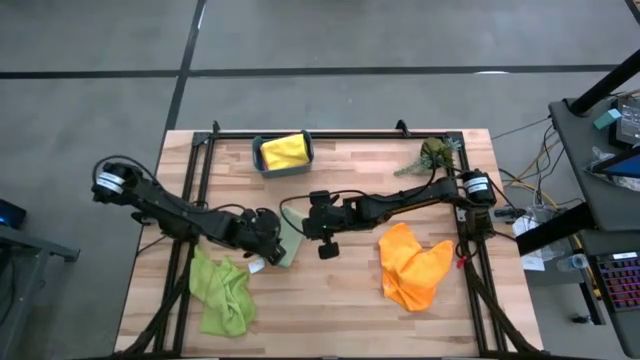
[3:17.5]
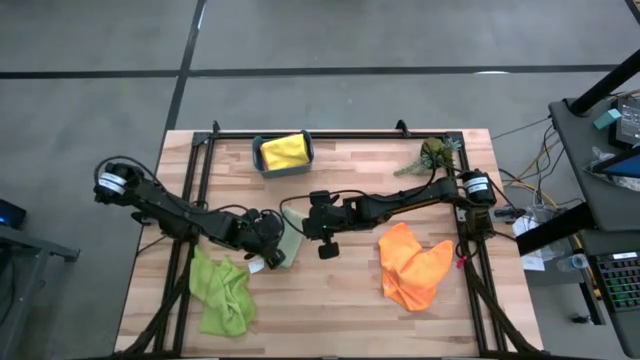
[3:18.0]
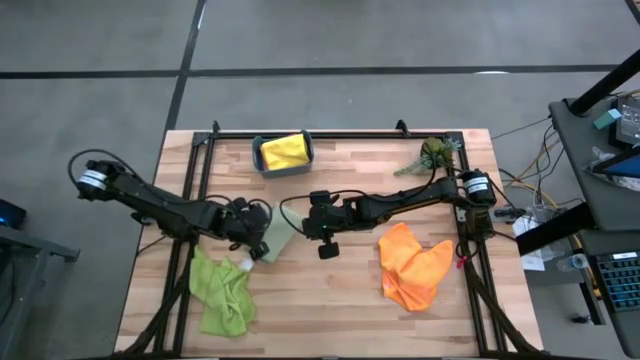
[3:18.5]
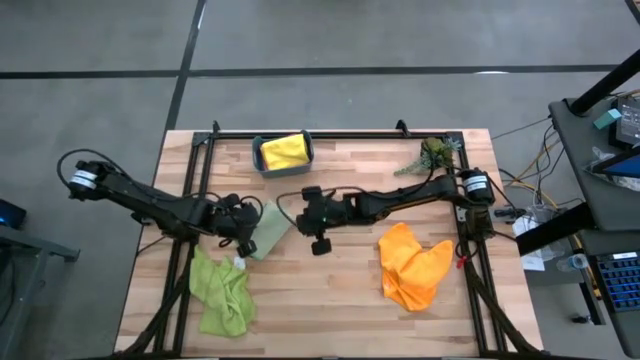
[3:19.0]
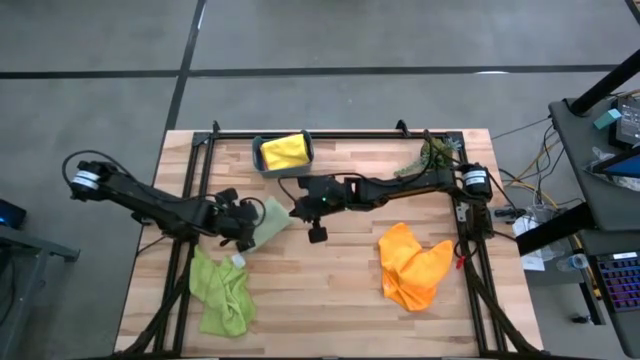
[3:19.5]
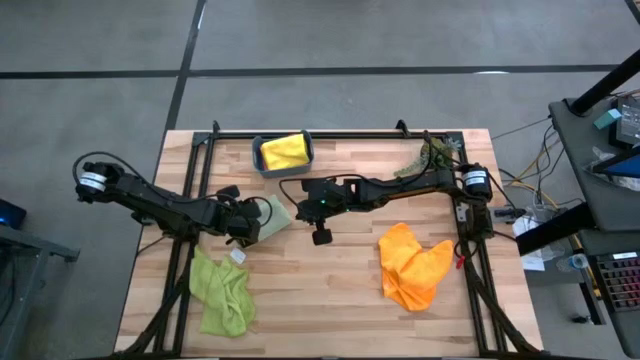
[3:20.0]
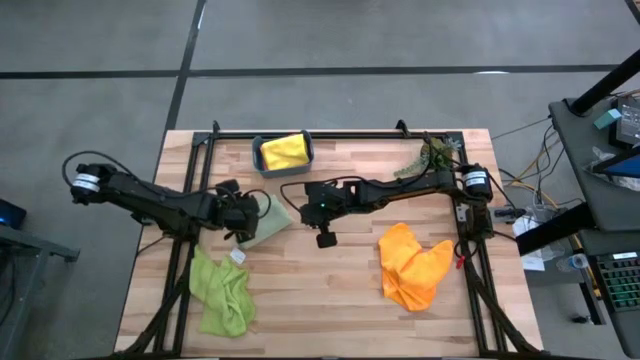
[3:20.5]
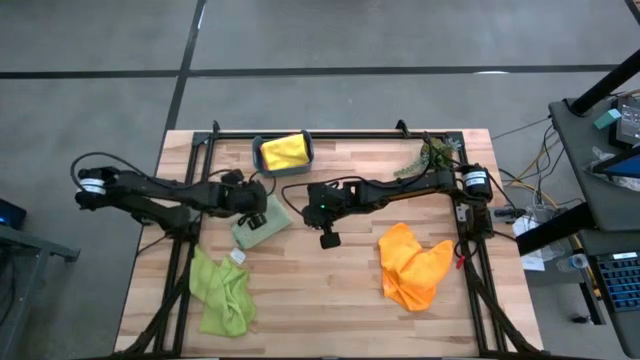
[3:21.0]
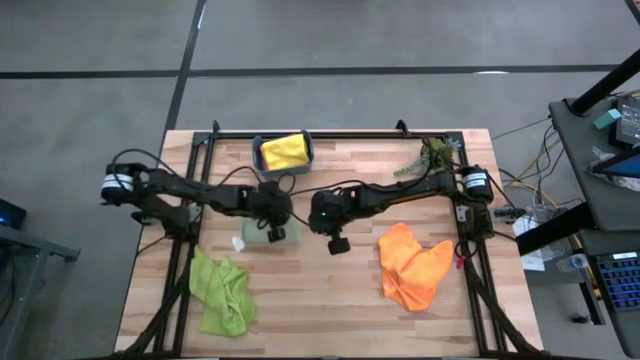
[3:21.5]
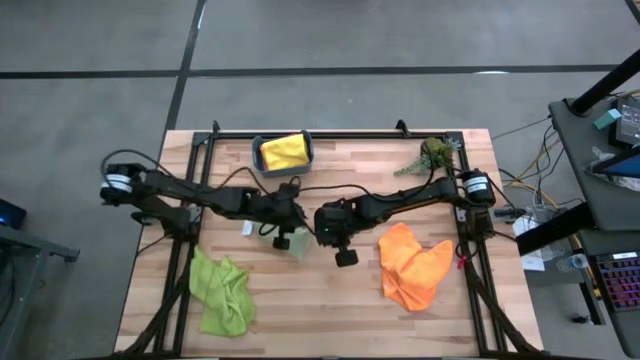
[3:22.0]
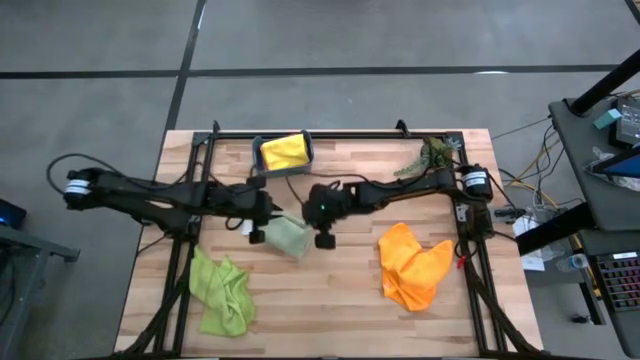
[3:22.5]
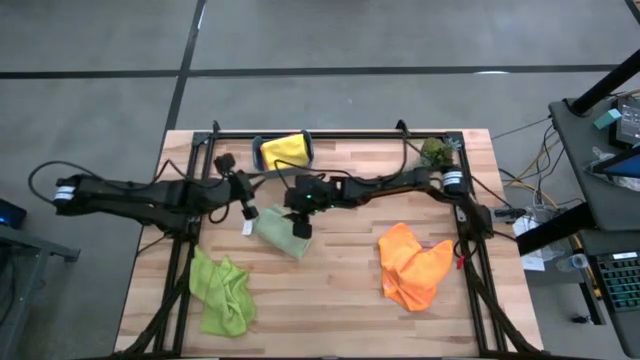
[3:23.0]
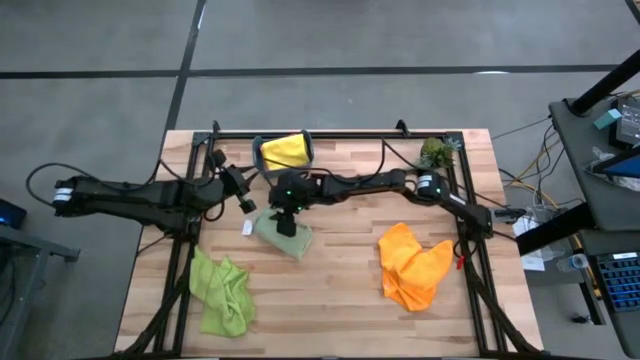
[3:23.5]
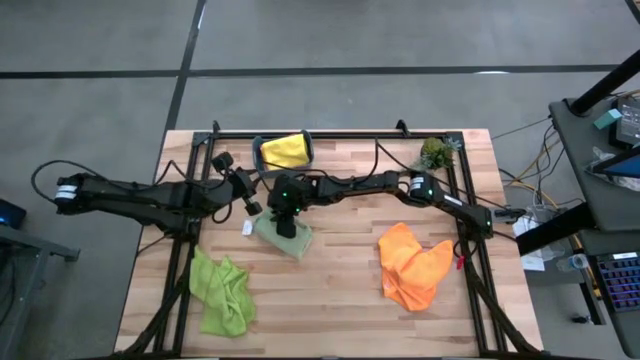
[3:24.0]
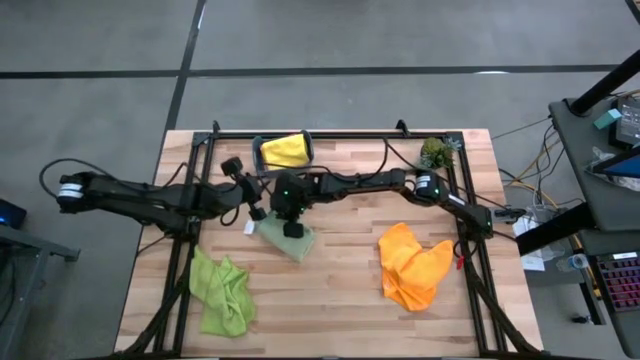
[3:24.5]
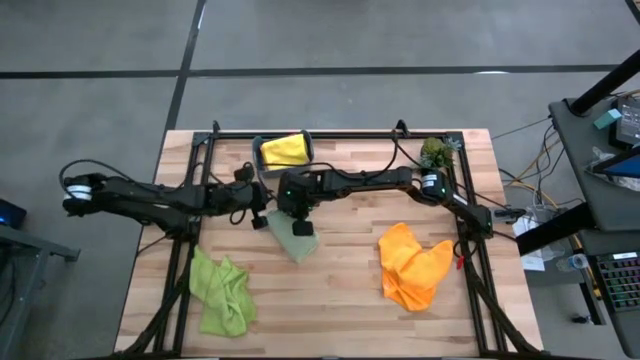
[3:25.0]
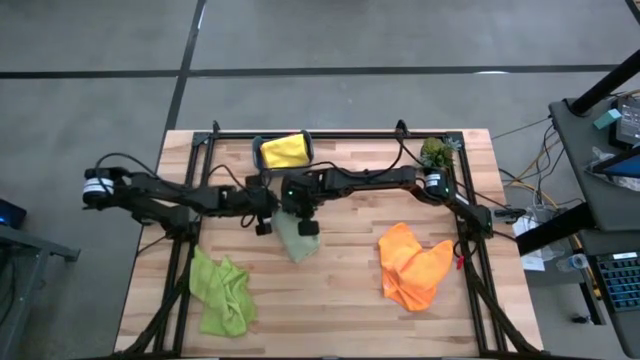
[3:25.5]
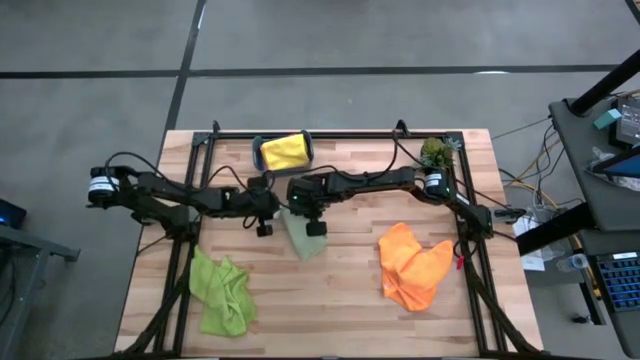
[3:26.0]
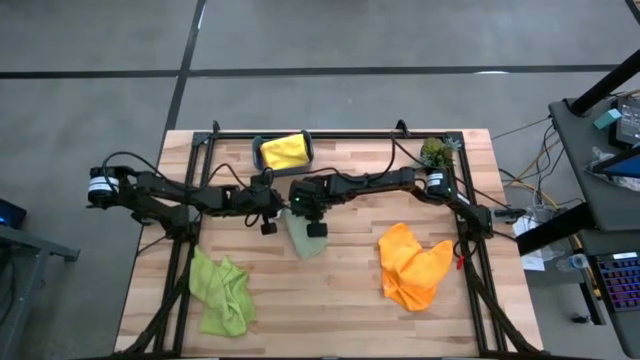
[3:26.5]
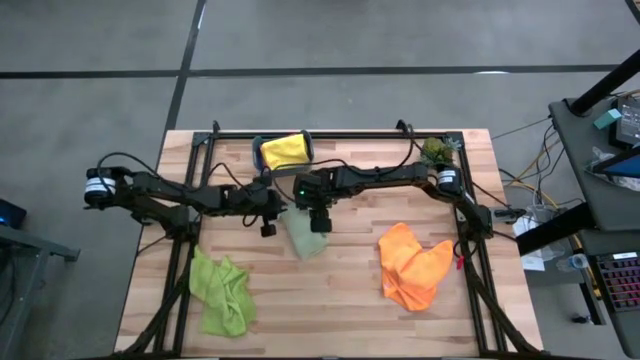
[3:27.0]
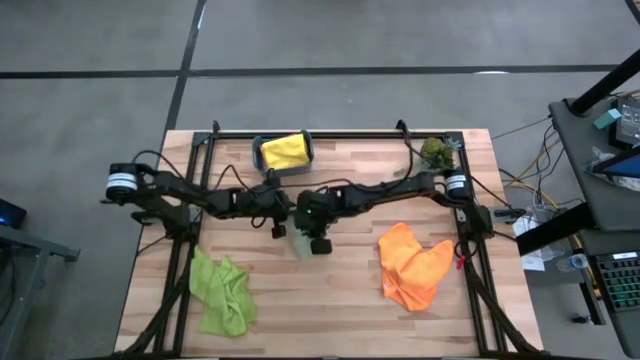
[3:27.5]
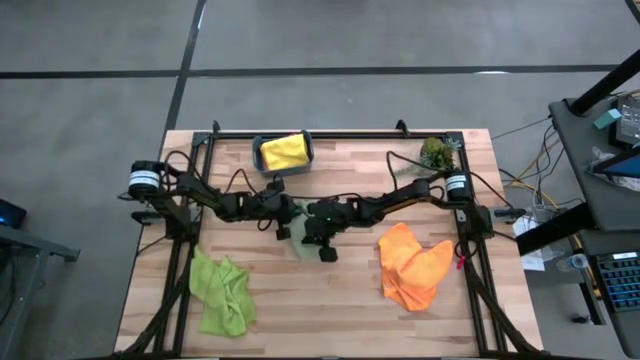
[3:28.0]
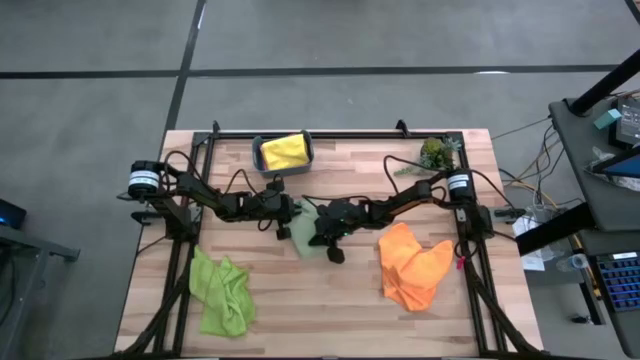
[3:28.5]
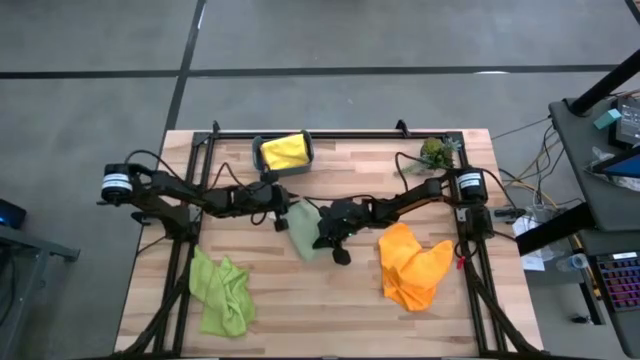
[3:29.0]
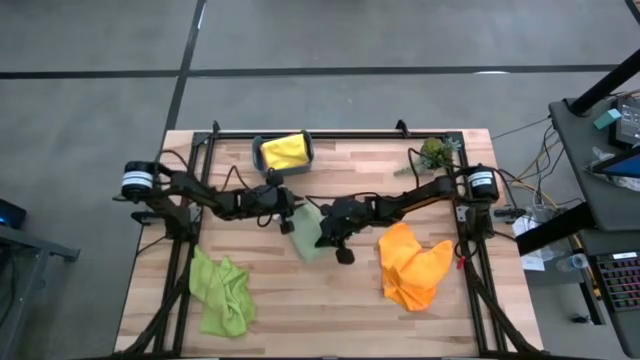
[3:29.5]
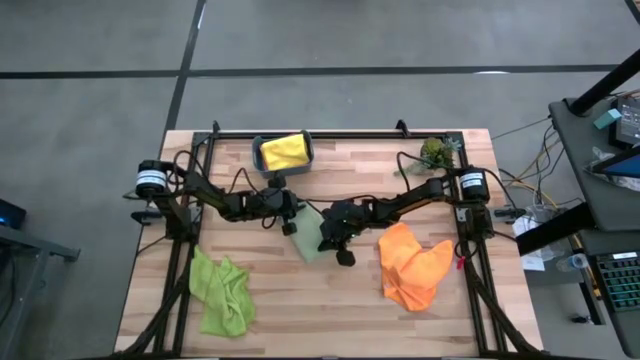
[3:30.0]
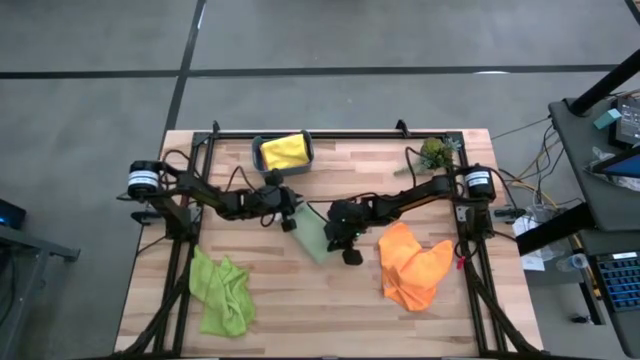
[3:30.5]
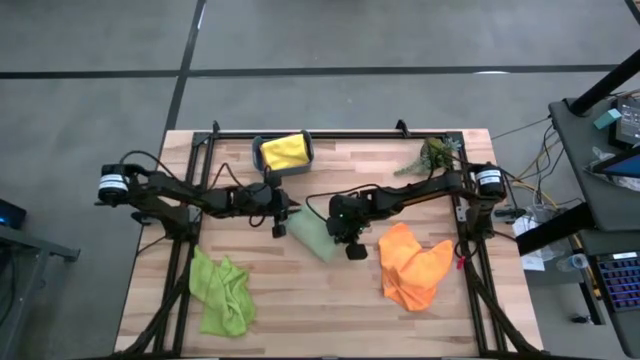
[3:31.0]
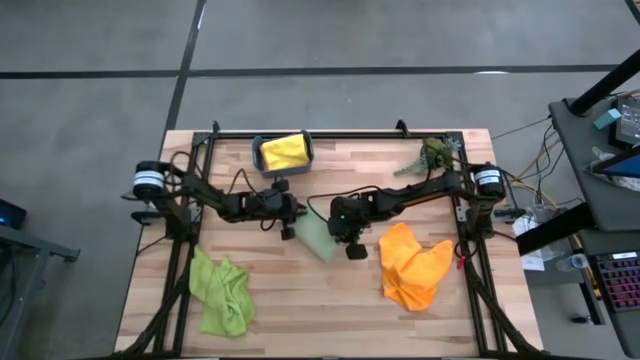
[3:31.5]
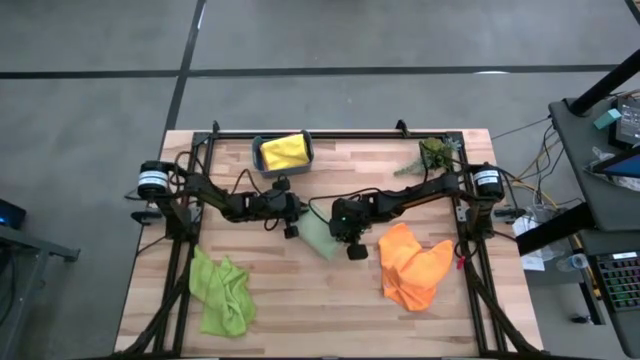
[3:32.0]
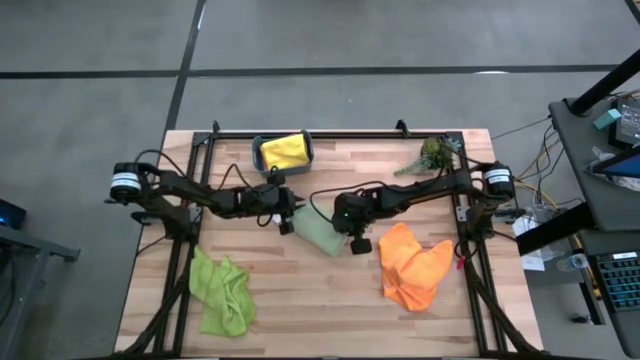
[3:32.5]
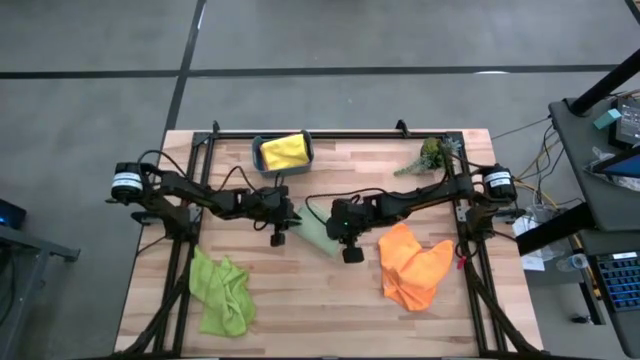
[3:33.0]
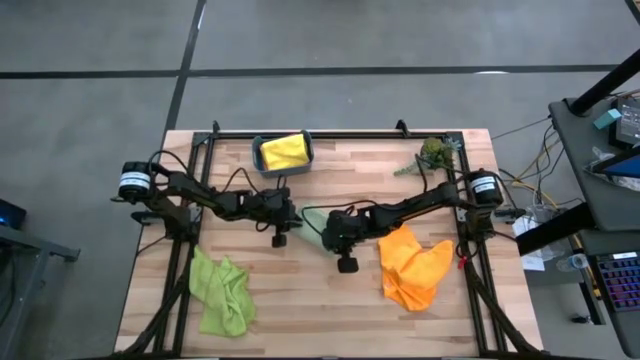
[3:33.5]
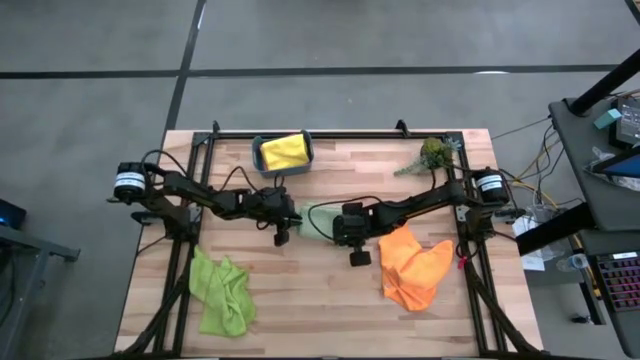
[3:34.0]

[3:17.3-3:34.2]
Task: Fold microfiber towels
Fold the green microfiber towel

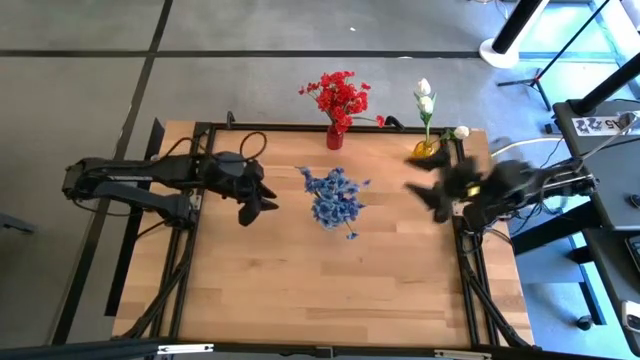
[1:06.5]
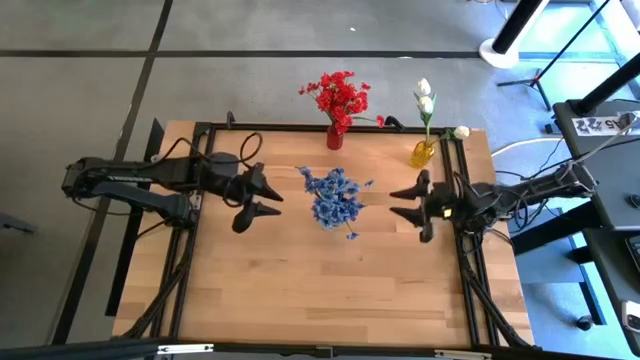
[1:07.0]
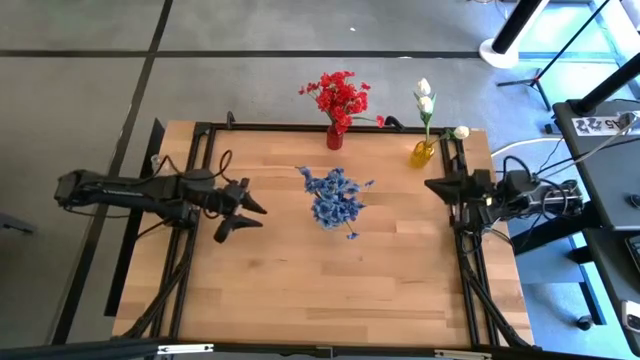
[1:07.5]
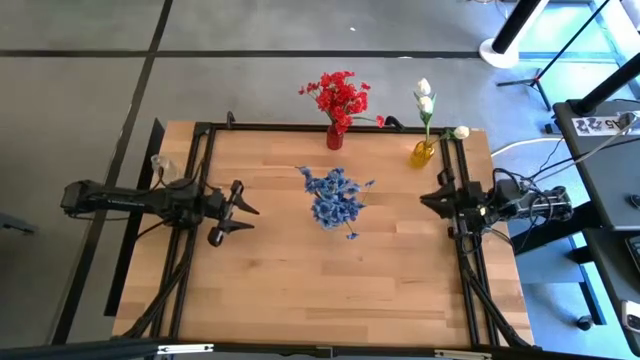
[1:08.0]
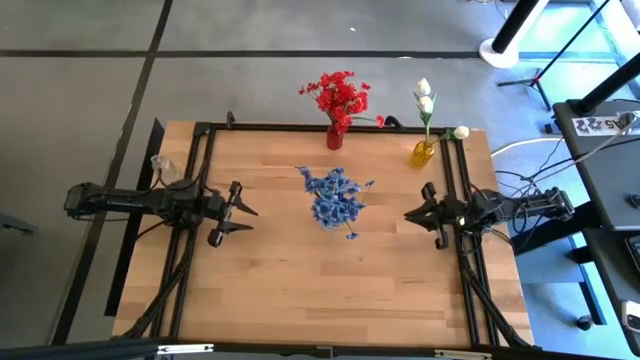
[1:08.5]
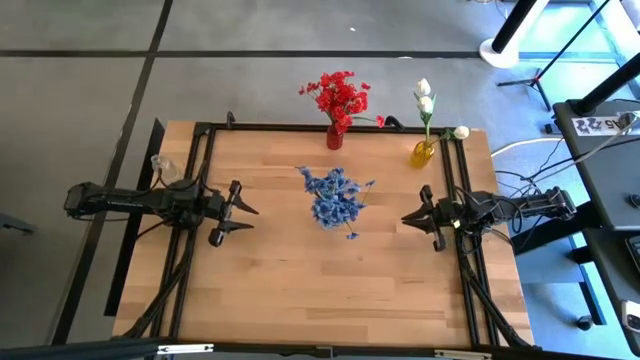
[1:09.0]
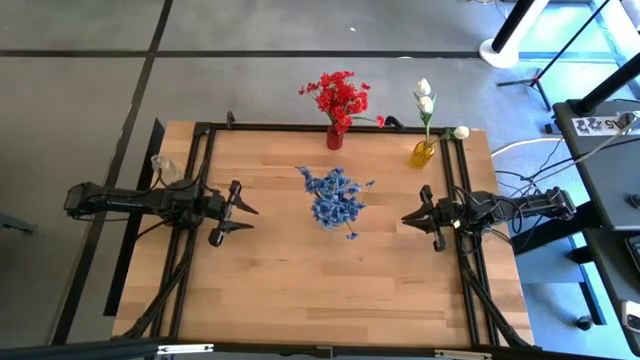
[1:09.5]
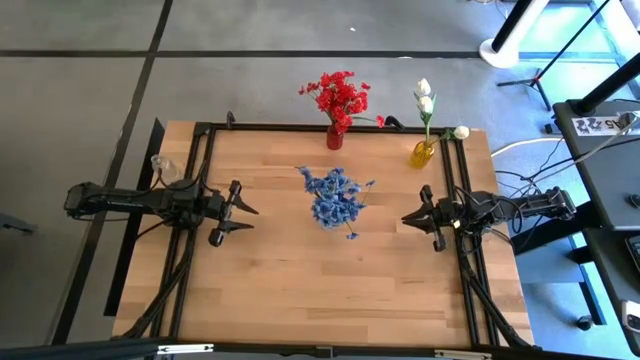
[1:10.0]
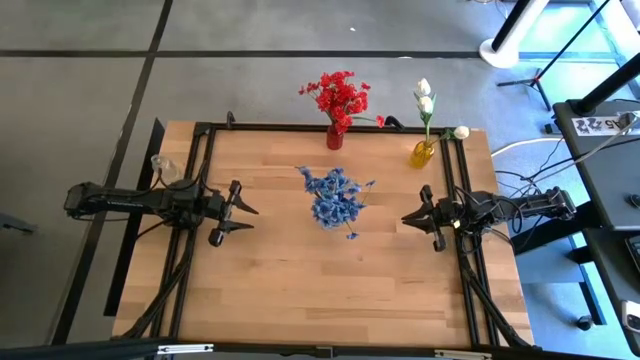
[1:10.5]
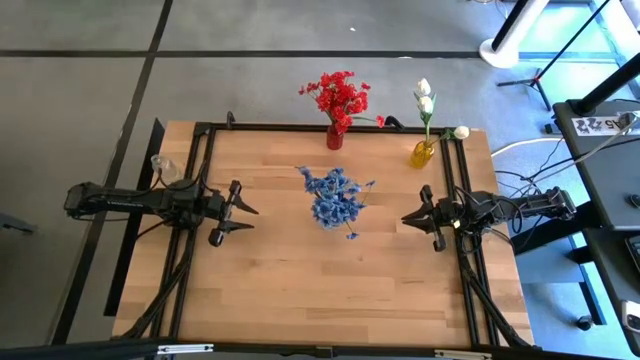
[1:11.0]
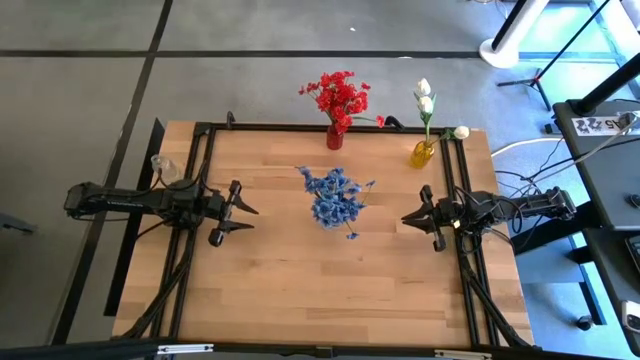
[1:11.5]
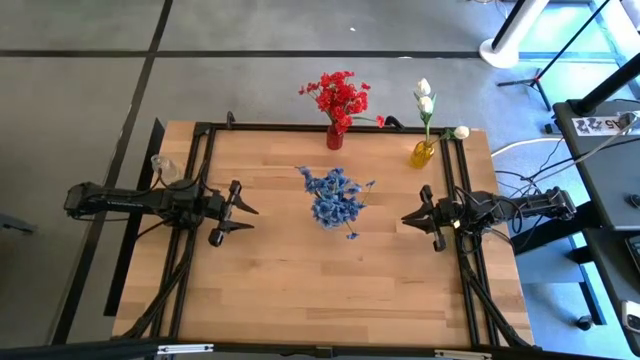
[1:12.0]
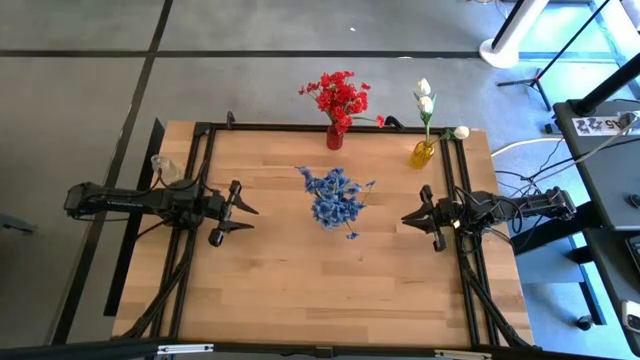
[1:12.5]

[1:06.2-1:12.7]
Task: Sort flowers into vase by color
Return to Home Position
